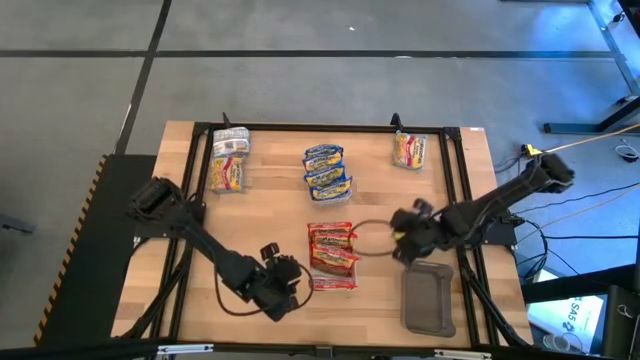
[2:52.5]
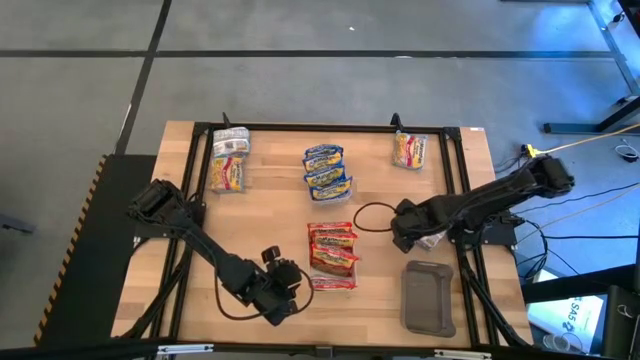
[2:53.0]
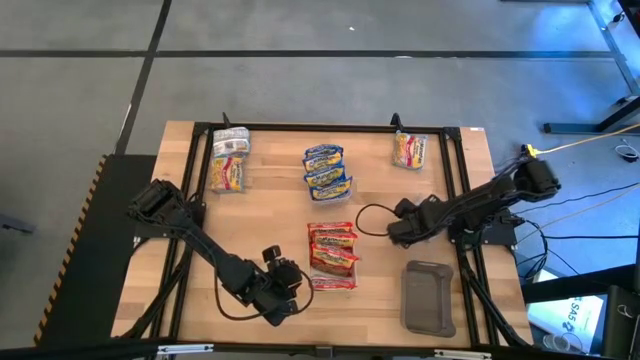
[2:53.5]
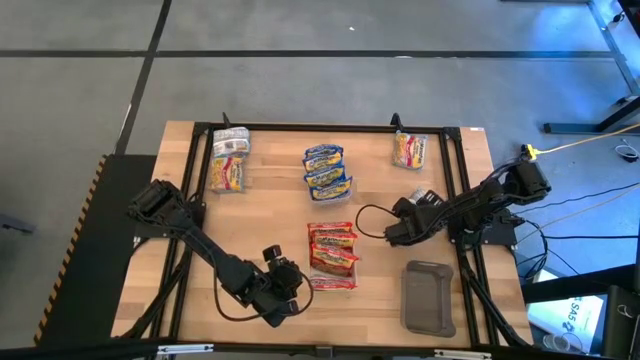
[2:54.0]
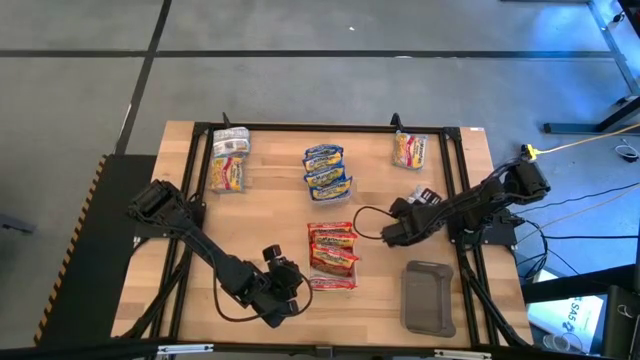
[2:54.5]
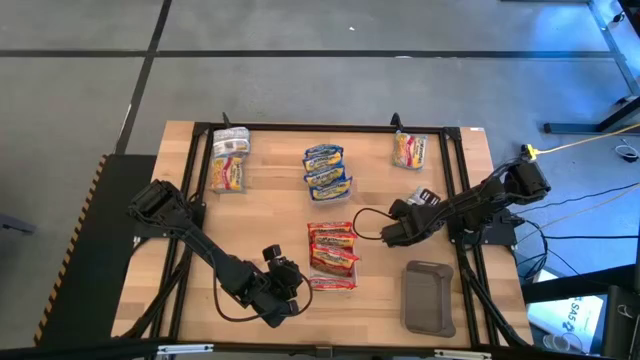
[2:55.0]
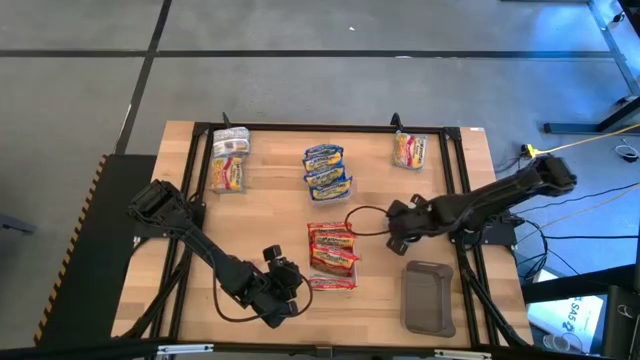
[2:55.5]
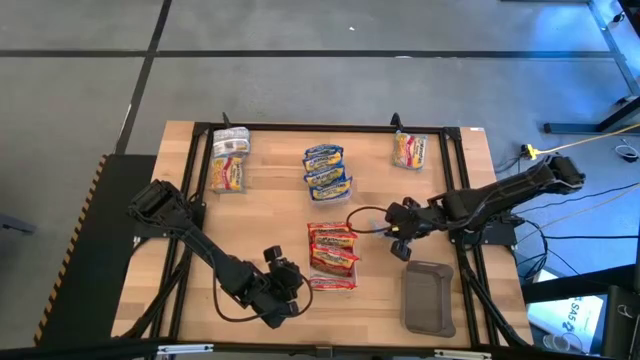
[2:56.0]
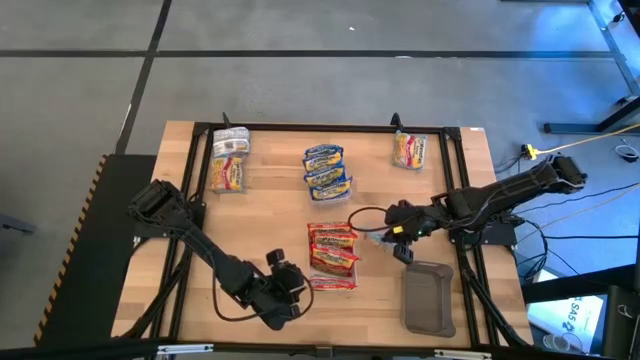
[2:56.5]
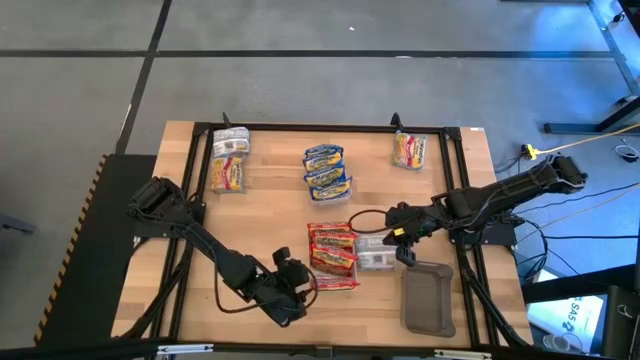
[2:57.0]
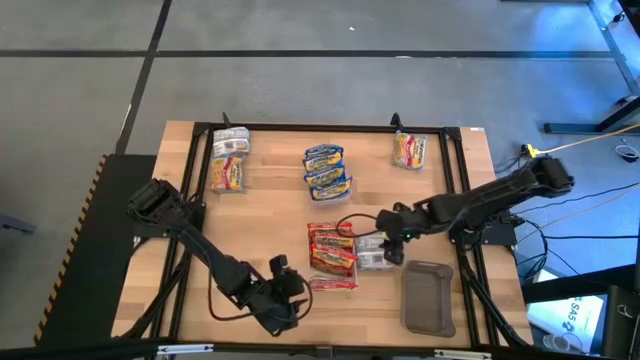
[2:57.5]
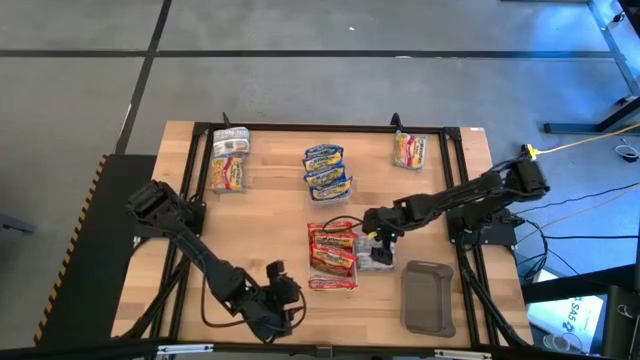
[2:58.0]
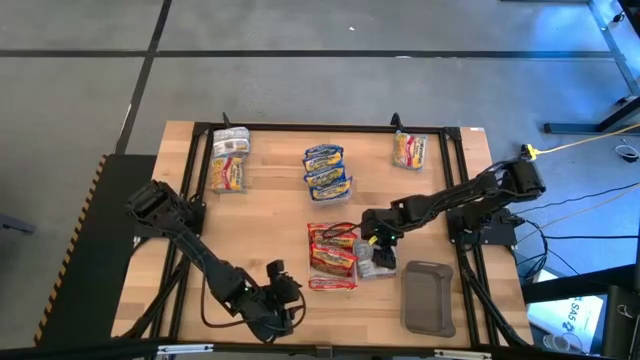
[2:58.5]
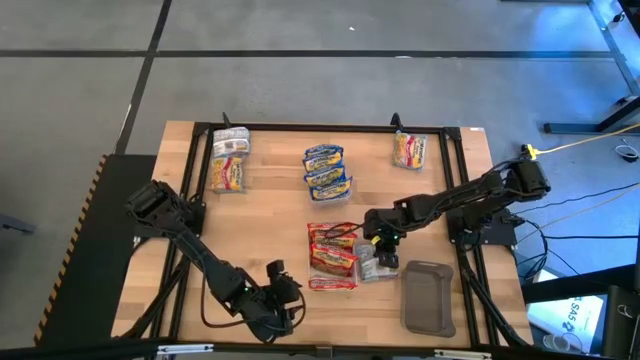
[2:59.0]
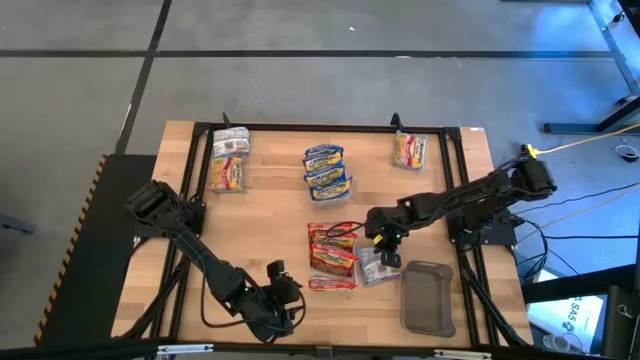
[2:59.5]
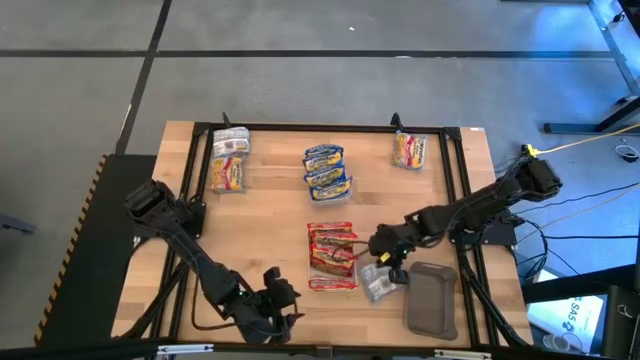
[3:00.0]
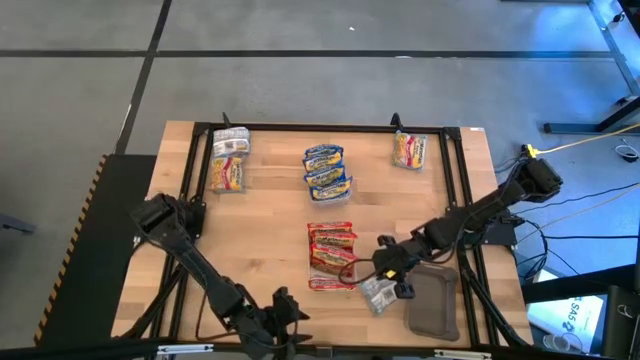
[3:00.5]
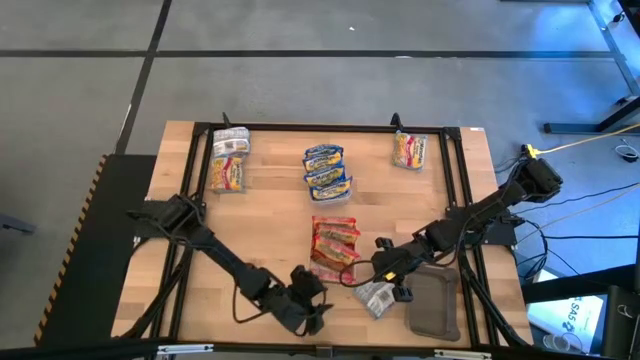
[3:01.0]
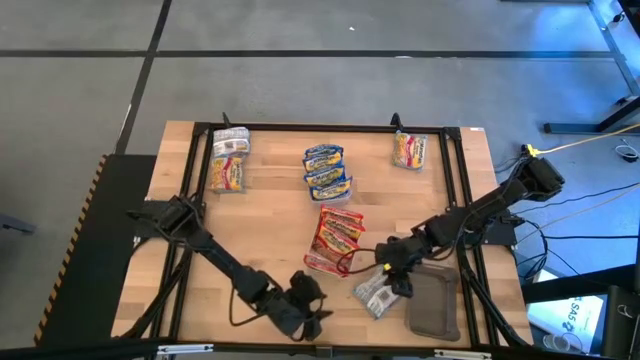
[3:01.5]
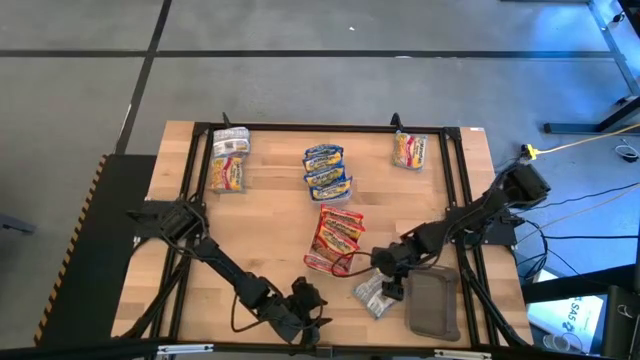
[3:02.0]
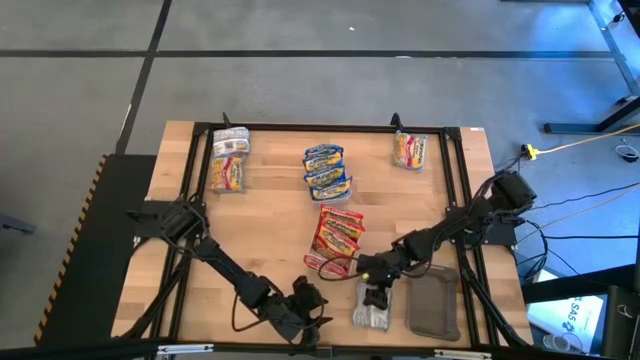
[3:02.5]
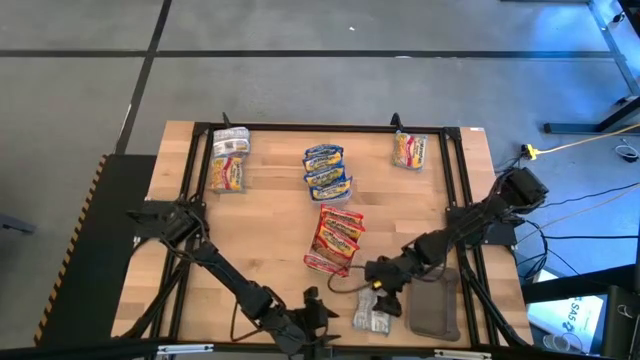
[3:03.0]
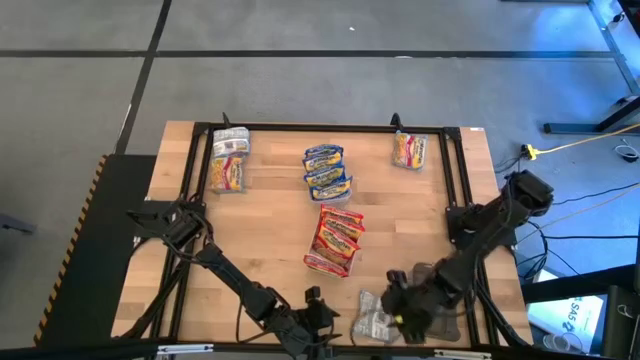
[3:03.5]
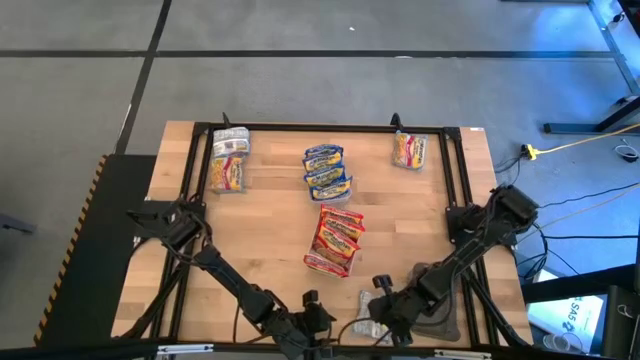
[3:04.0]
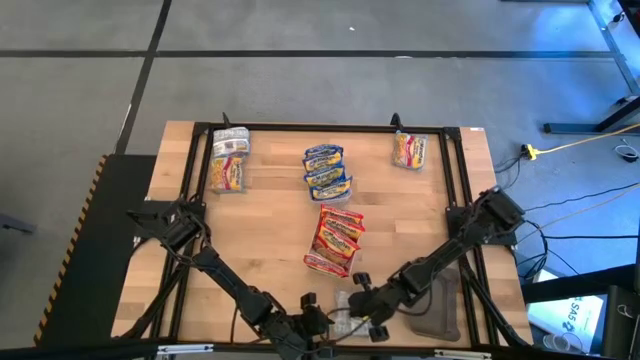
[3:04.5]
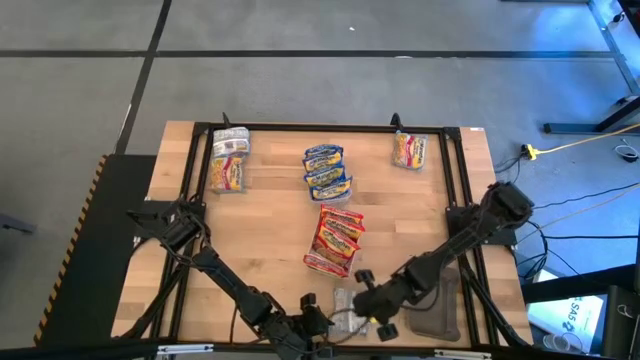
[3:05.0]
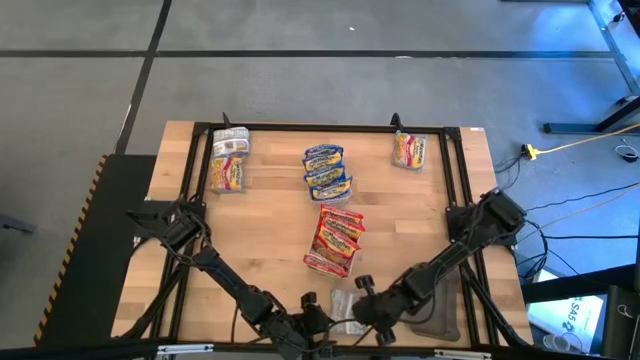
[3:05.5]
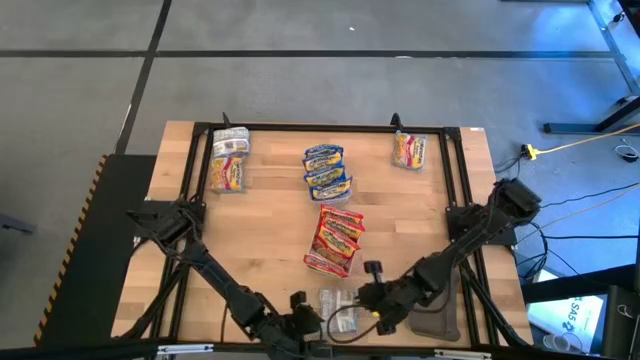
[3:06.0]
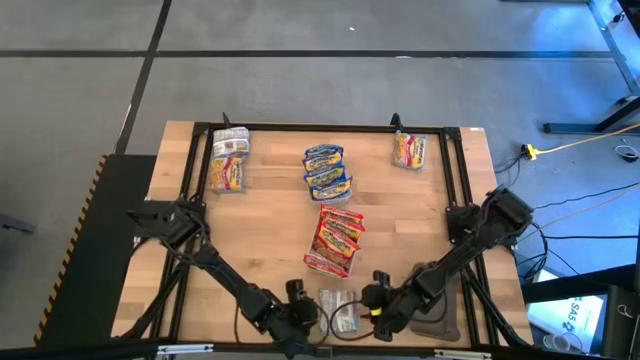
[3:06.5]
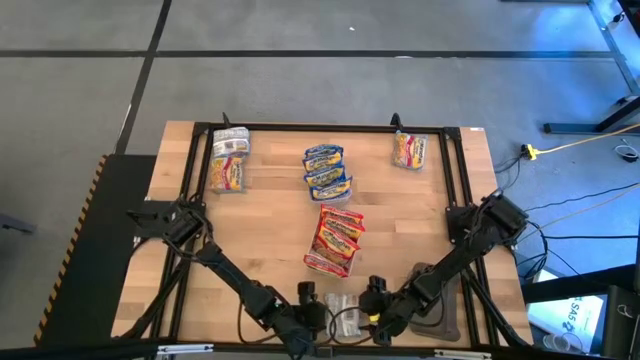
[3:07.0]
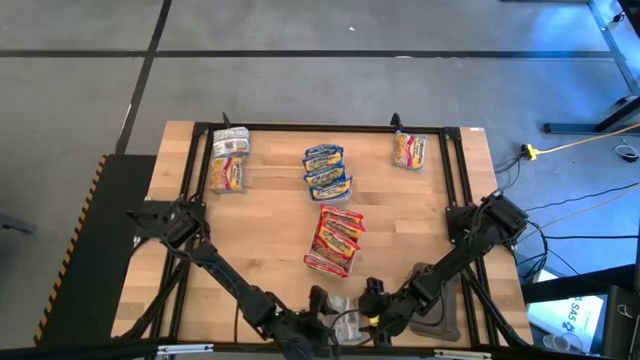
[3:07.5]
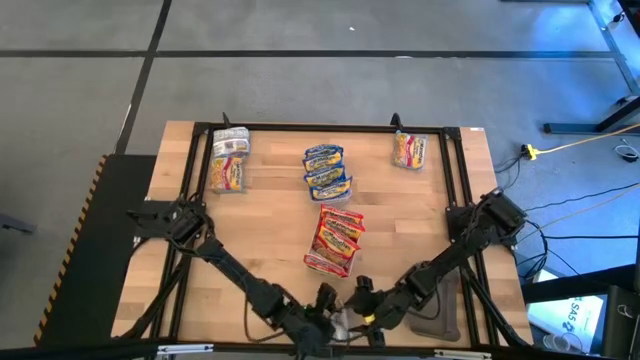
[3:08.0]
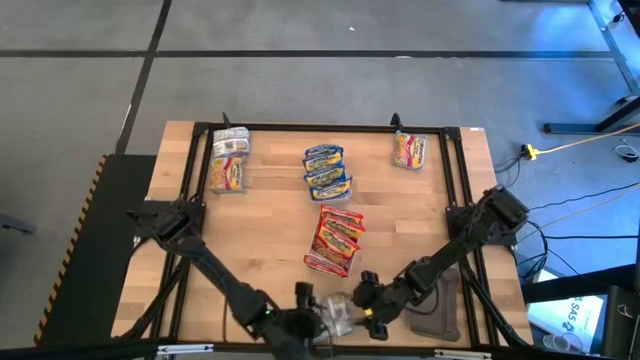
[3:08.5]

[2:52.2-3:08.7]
Task: Sort Maruchan noodles
Put the light blue noodle pack into the black bin

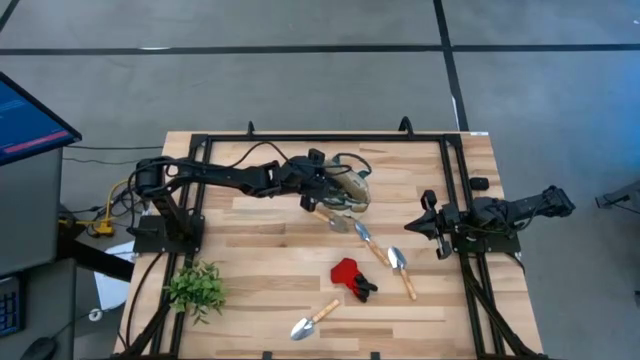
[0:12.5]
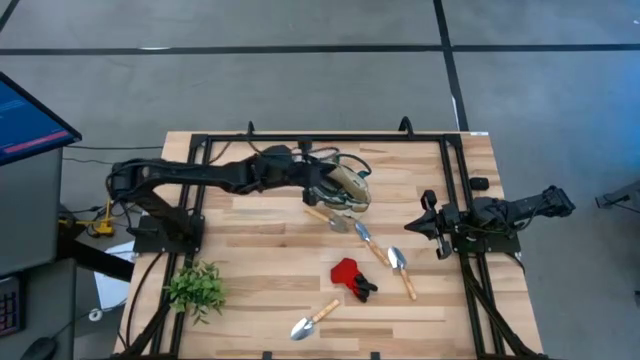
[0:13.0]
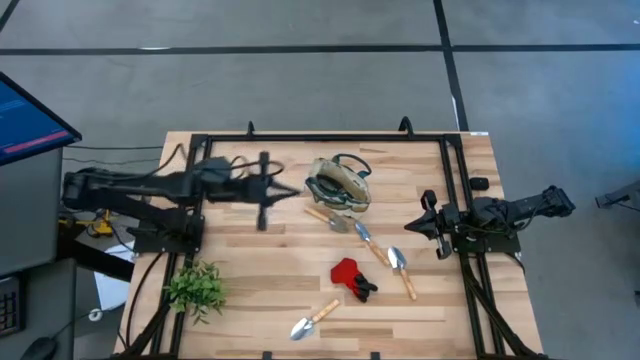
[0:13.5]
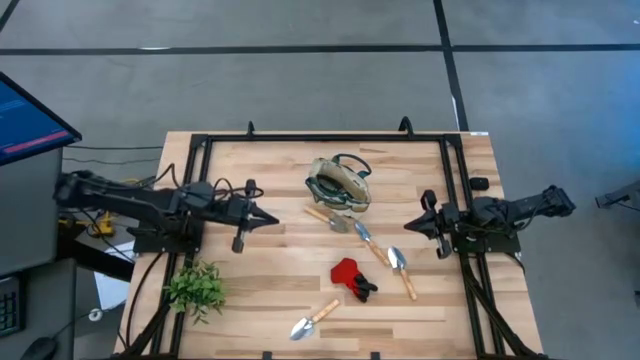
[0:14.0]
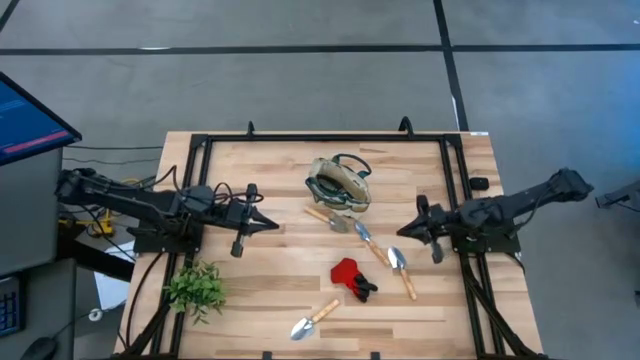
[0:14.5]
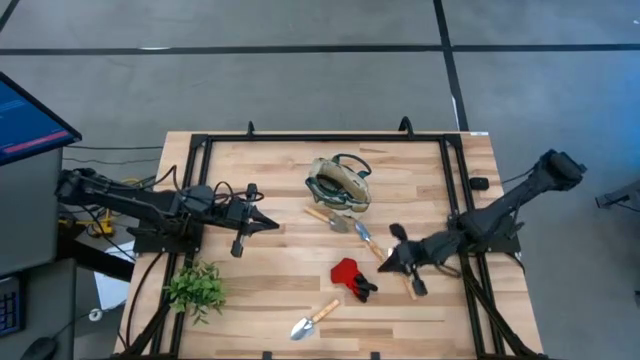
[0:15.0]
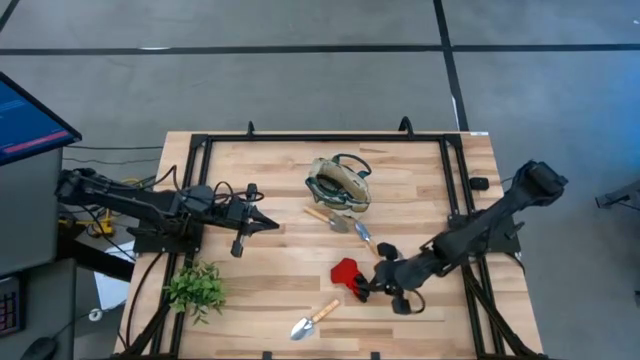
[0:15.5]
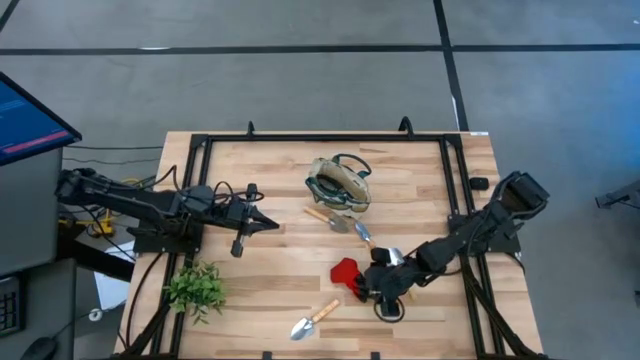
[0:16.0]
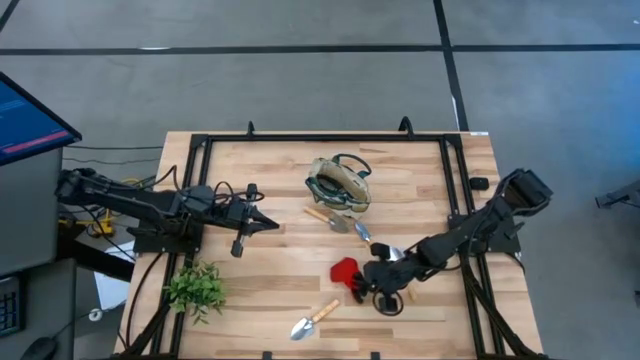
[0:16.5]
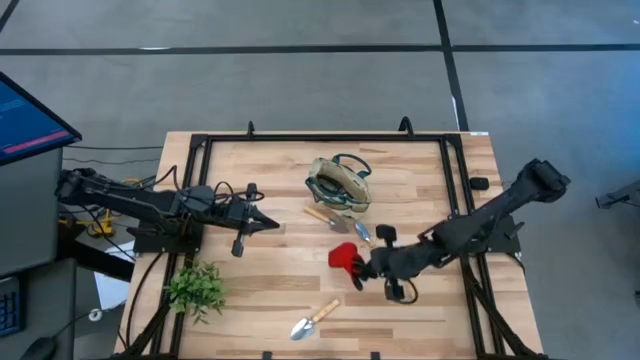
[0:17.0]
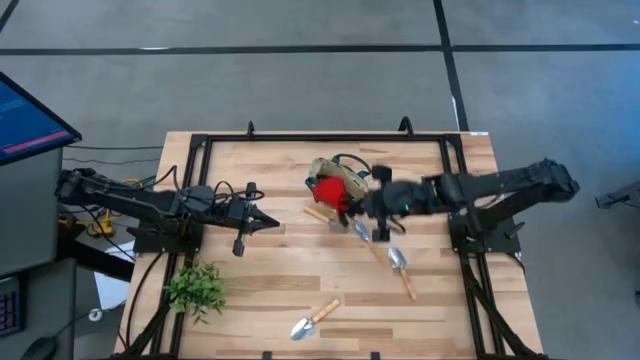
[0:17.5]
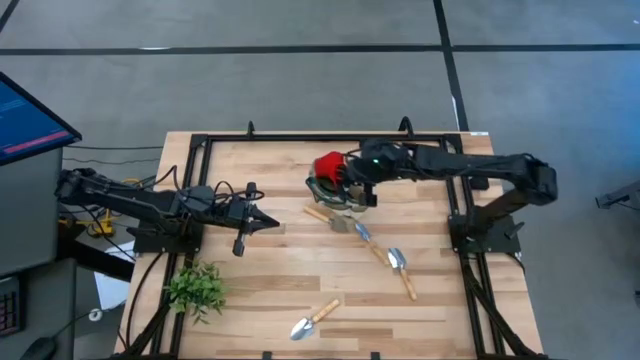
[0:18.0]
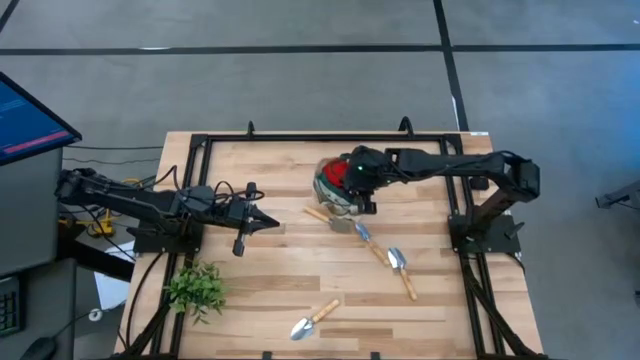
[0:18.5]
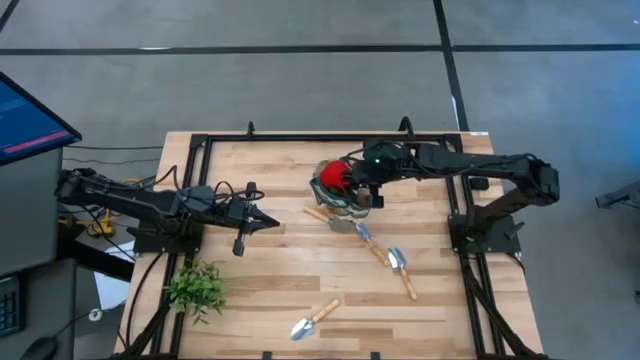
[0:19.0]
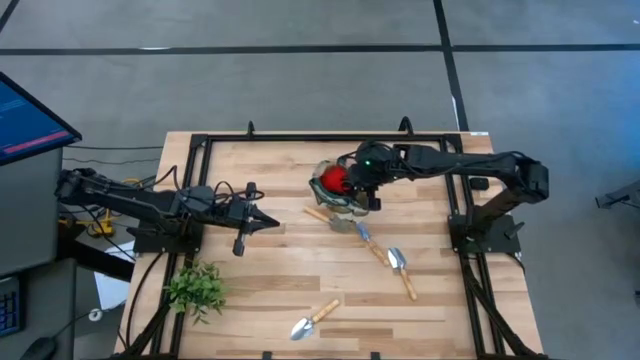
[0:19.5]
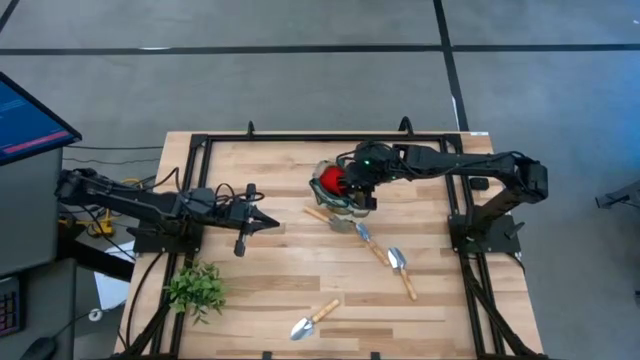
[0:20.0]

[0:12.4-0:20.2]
Task: Pick & Place Garden tools in Gardening bag
Put the red gloves into the gardening bag
